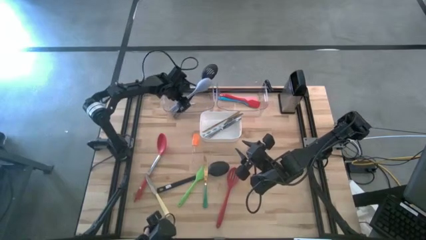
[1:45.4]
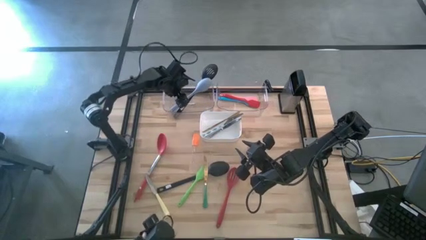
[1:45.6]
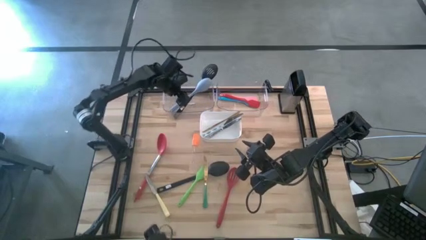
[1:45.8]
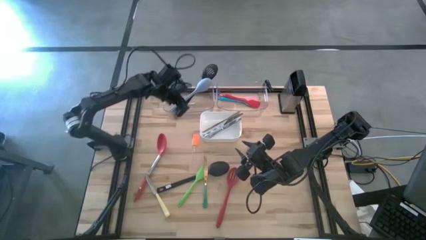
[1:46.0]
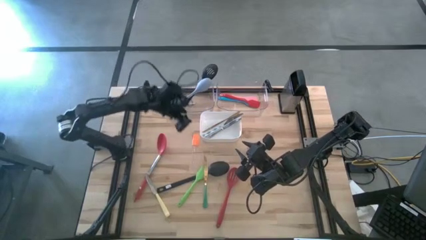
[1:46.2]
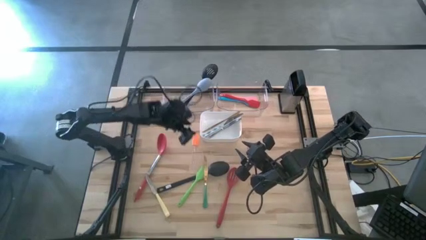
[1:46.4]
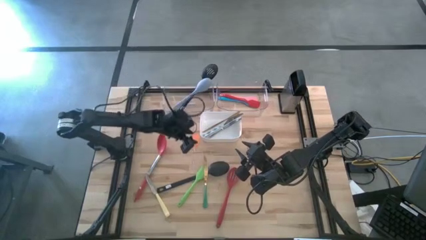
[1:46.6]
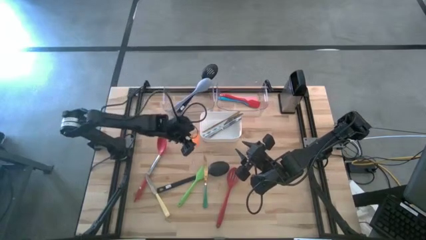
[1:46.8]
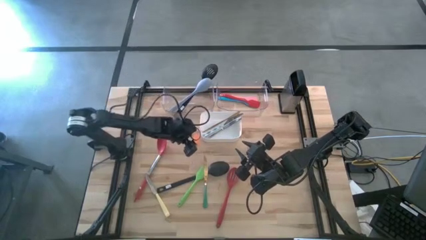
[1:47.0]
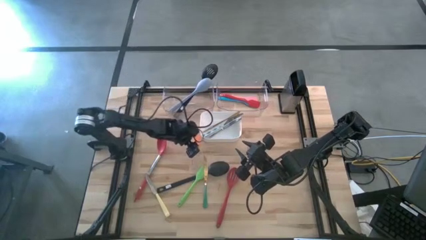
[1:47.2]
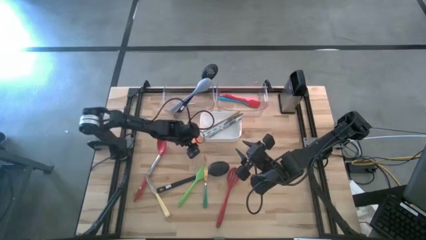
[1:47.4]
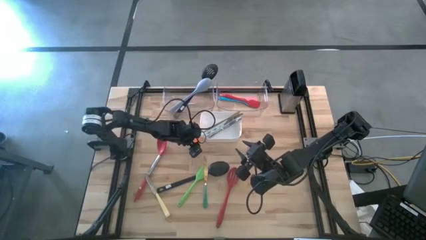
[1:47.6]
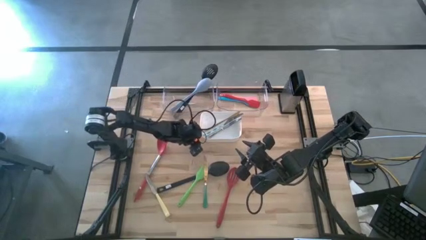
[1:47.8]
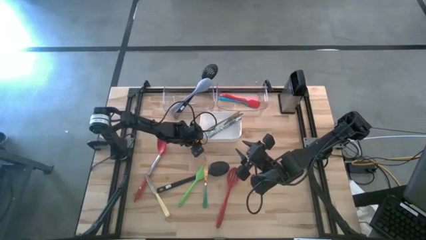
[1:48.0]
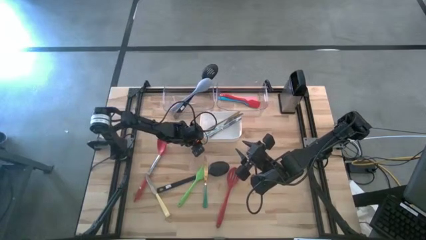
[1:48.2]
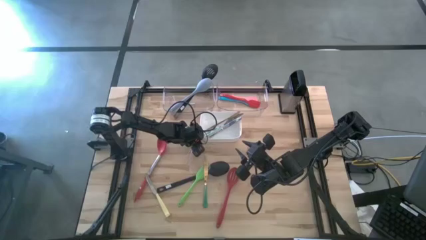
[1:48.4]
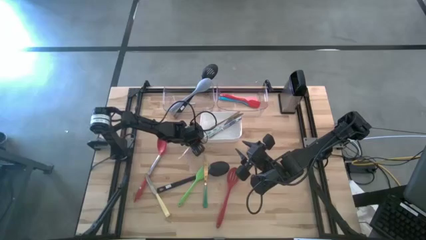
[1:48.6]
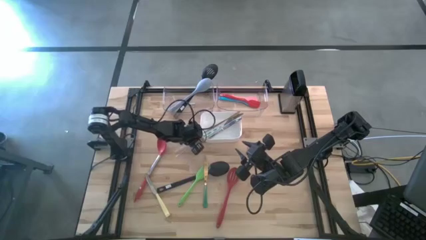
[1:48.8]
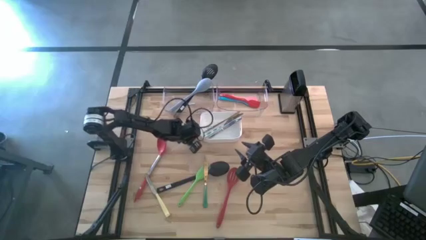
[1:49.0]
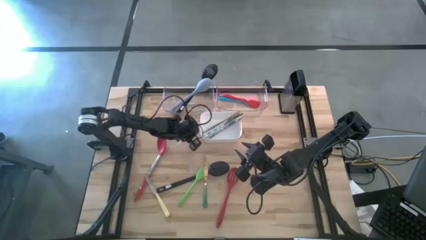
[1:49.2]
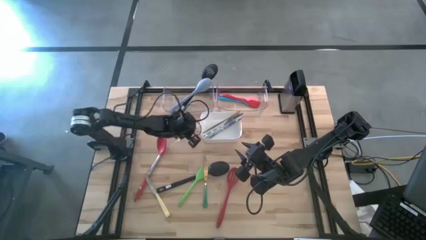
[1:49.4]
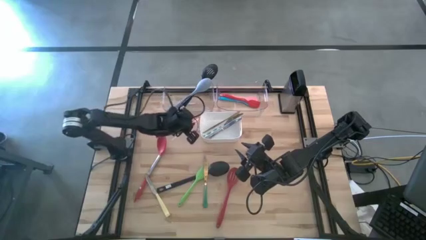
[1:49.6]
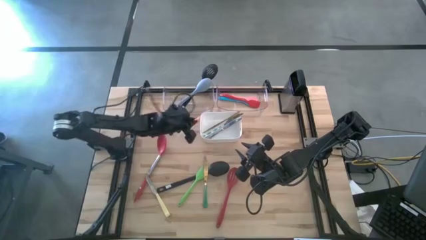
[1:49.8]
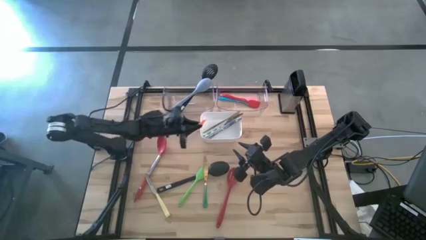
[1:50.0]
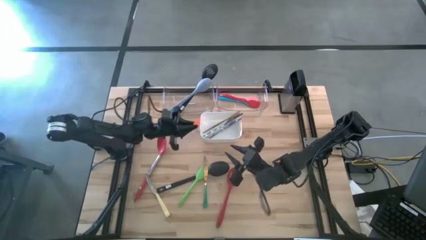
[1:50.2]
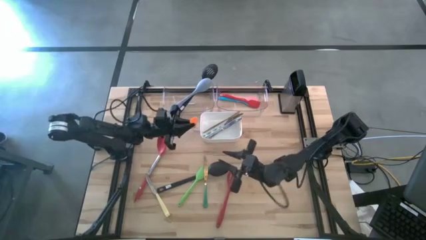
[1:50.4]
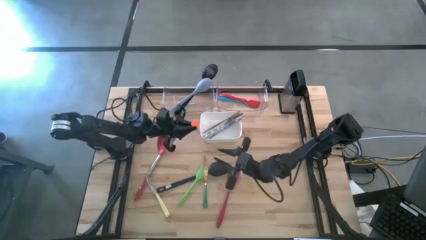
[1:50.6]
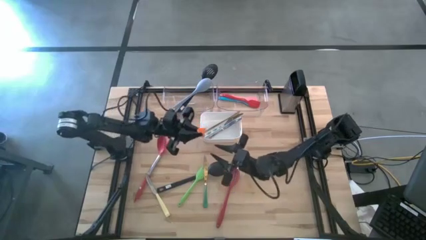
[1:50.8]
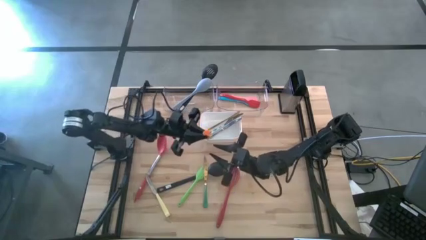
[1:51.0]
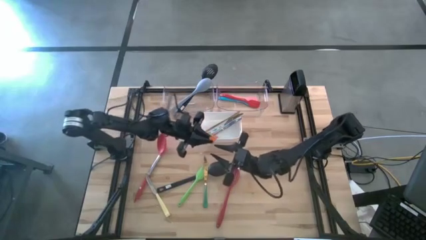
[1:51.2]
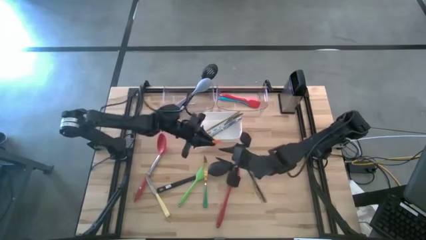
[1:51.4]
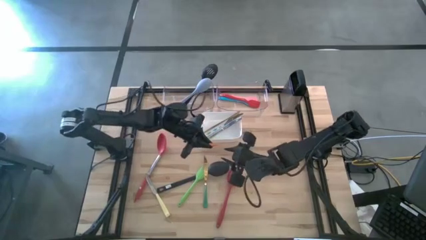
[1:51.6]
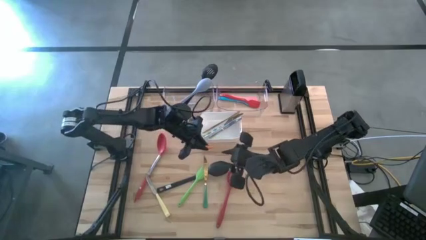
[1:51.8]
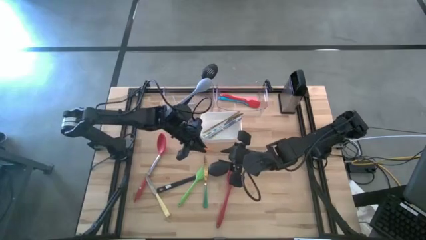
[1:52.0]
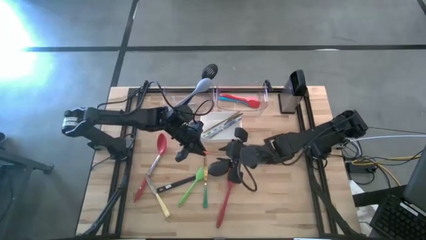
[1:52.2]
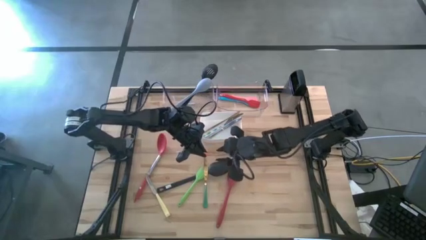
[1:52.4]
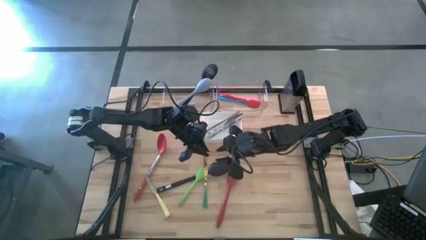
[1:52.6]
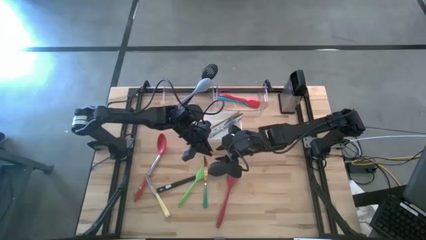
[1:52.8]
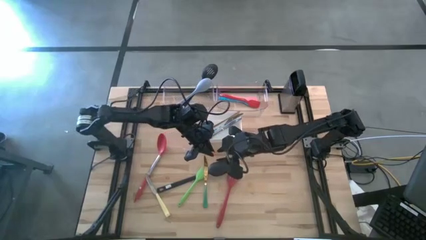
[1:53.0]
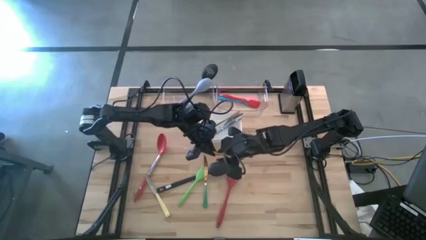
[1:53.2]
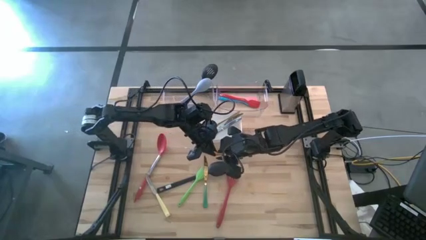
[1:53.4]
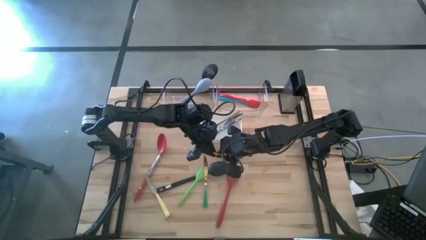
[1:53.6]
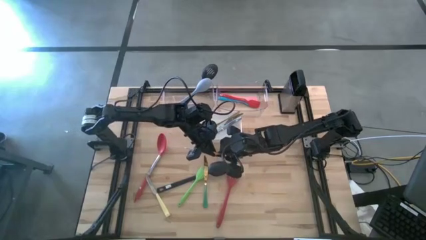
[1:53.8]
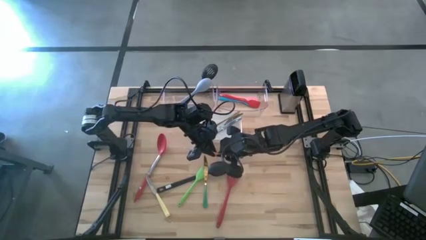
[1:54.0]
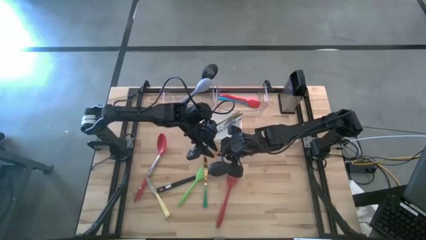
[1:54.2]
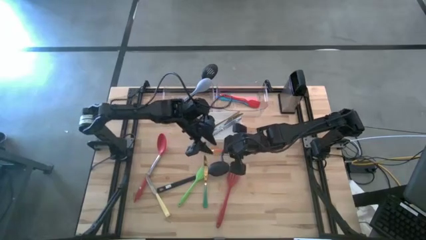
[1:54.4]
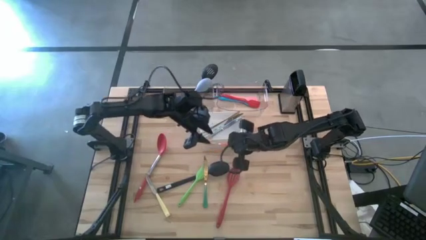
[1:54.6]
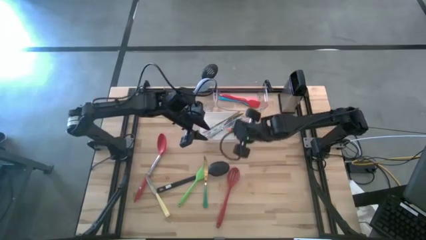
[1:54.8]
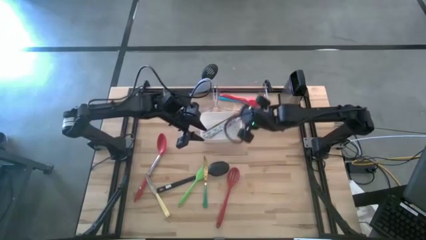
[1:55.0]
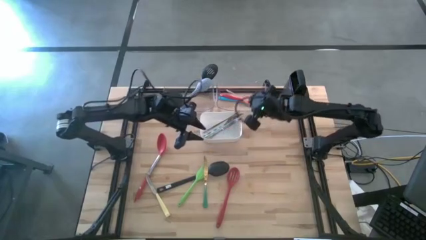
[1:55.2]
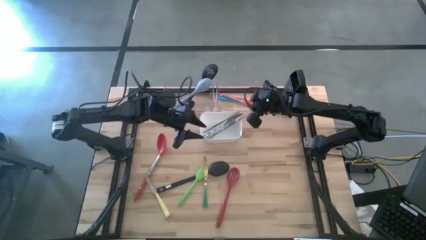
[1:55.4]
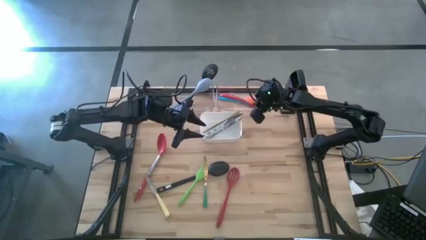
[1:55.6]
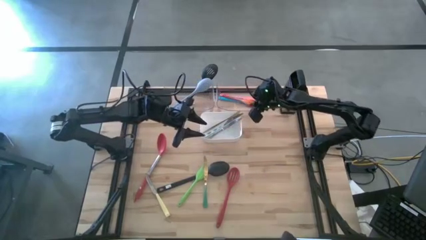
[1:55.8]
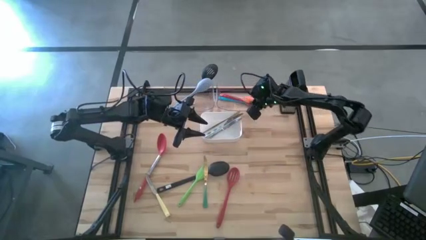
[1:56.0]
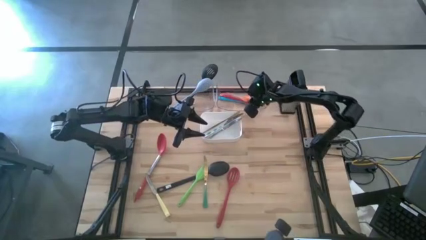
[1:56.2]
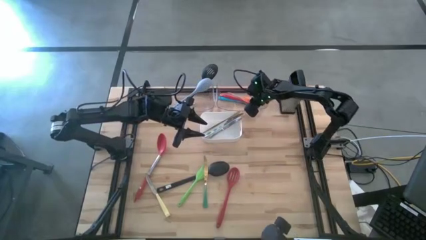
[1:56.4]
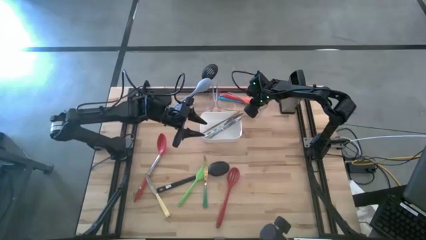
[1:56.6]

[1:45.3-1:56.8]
Task: Pick & Place Kitchen Items
Put the orange spatula into the right transparent bin

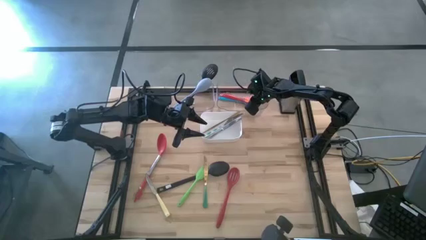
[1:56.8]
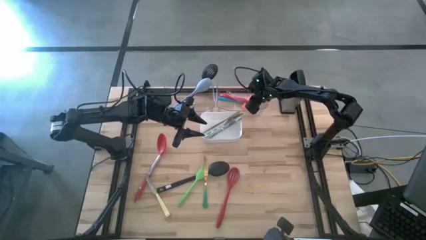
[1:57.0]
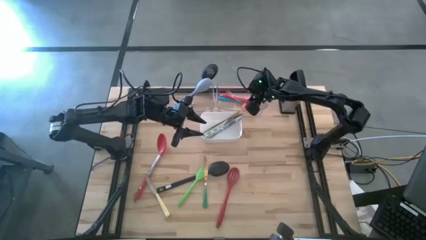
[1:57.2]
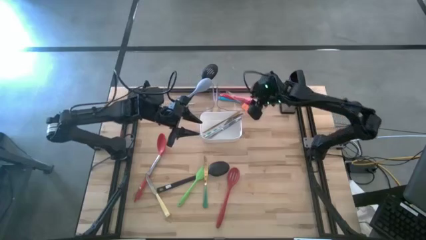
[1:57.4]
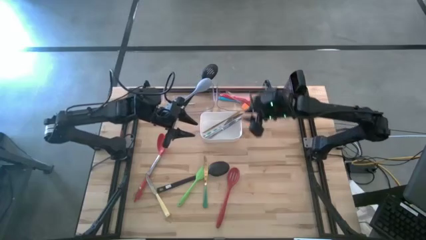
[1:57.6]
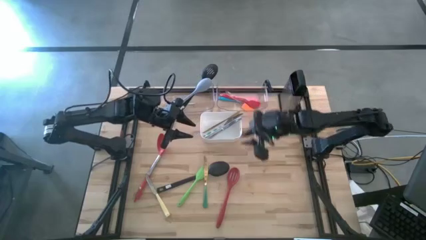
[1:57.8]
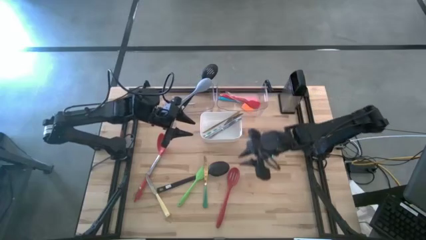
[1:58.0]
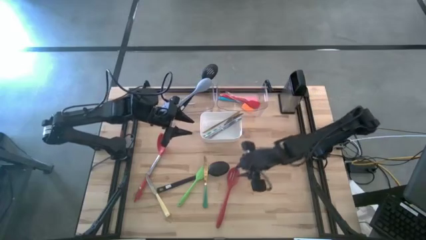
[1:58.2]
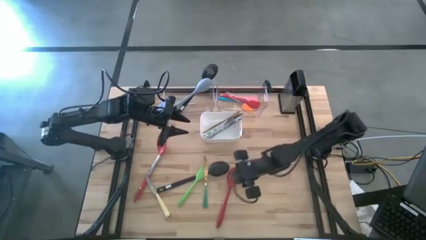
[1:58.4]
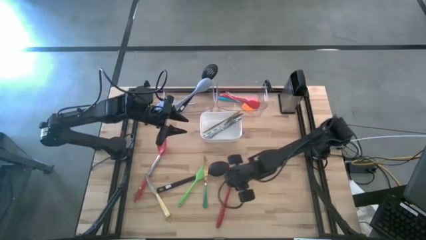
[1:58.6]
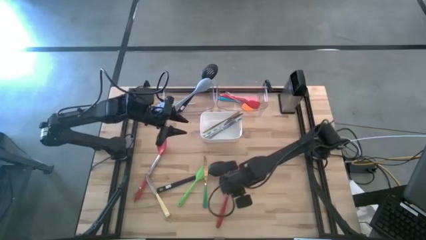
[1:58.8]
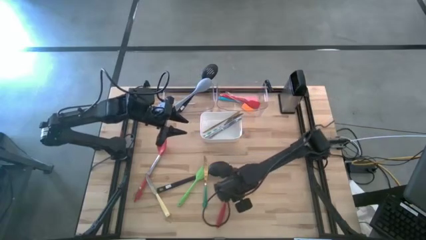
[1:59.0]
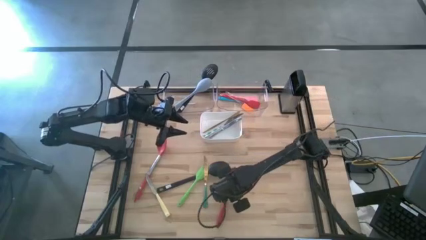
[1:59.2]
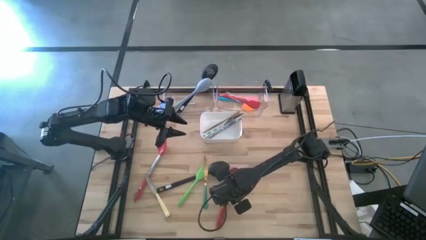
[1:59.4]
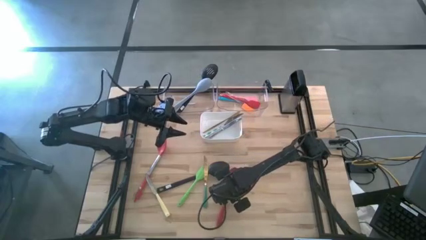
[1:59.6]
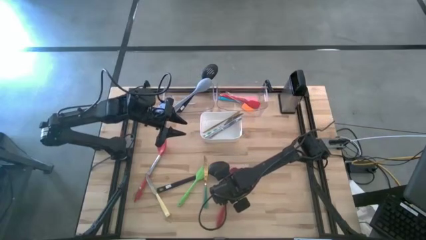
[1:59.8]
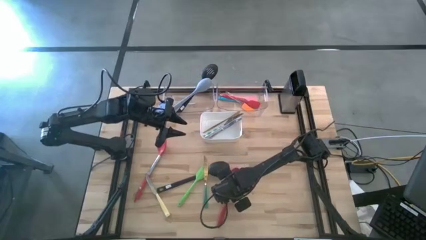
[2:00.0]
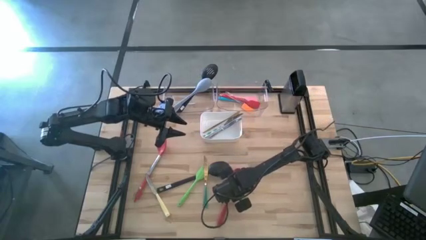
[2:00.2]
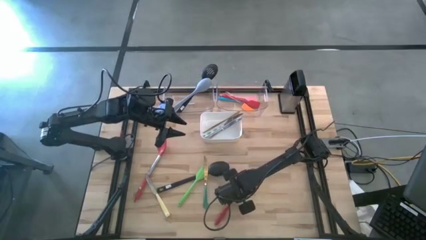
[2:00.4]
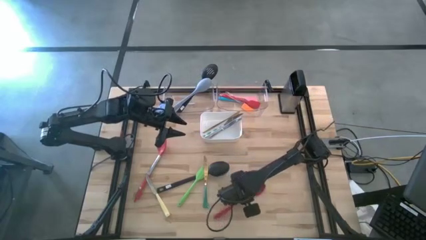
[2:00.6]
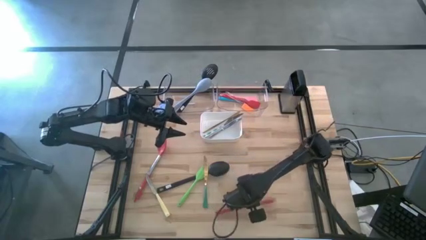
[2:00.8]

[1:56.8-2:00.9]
Put the red serving spoon into the left transparent bin

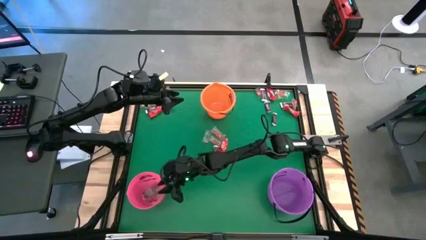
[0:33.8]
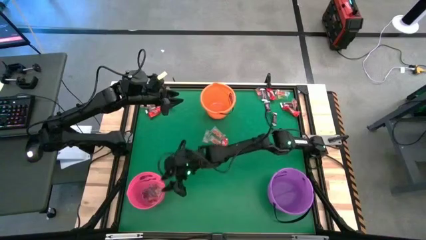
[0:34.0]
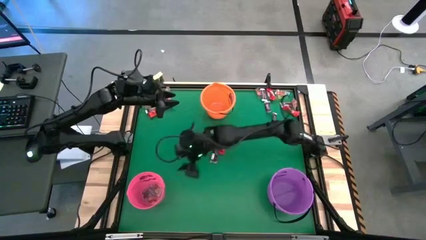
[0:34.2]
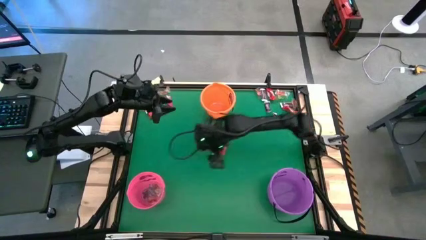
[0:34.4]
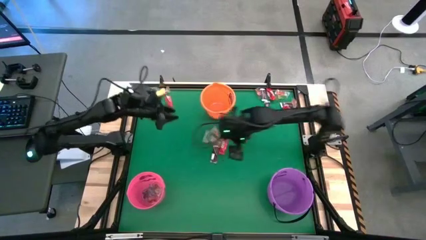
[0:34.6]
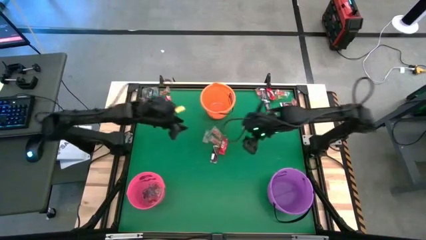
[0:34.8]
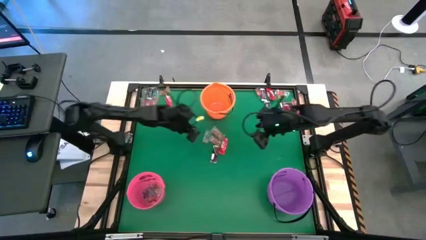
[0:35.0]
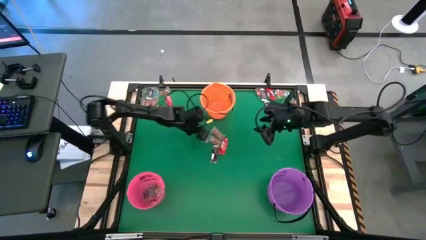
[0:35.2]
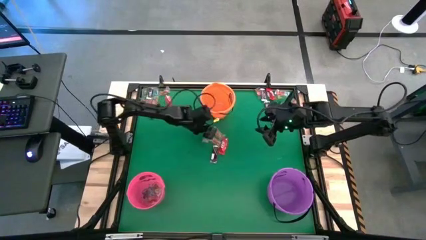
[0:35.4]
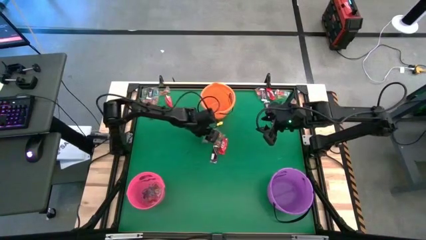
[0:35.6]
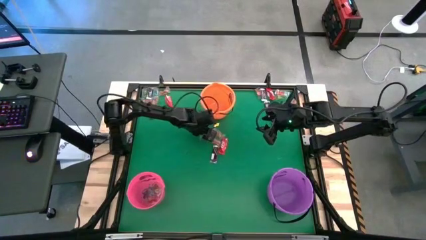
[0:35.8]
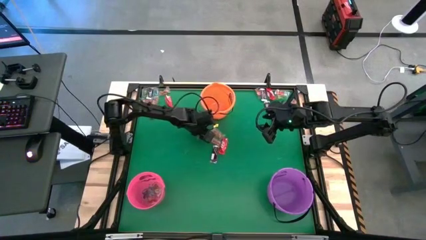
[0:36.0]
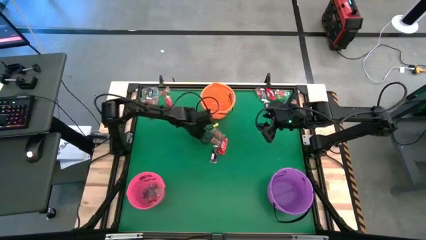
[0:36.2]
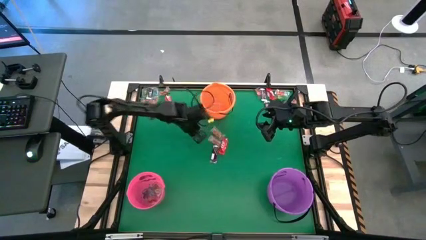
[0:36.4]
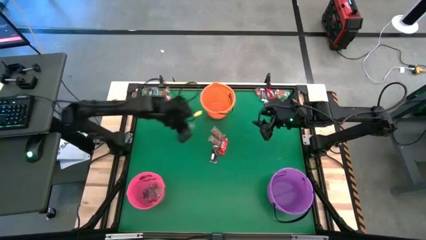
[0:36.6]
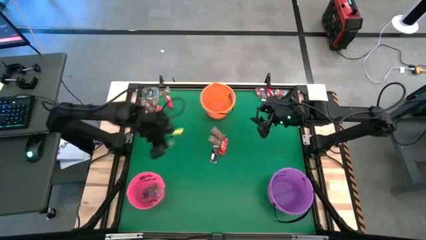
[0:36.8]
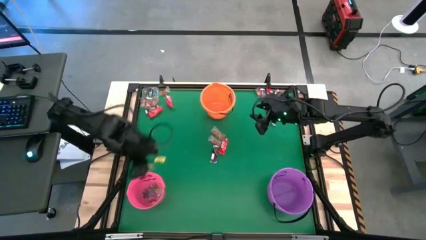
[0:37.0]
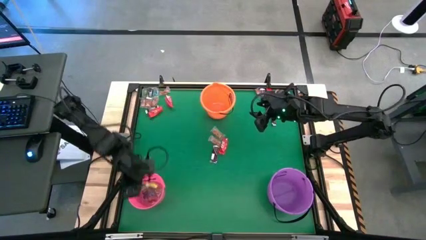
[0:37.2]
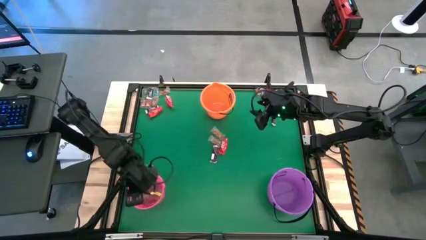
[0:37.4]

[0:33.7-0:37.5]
Task: Sort candy by brand, put in halloween buckets
Put the green gummy into the pink bucket
